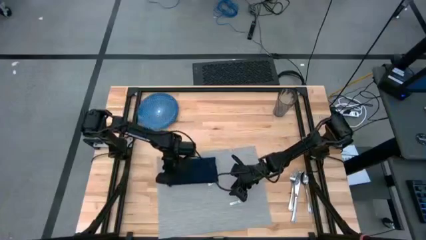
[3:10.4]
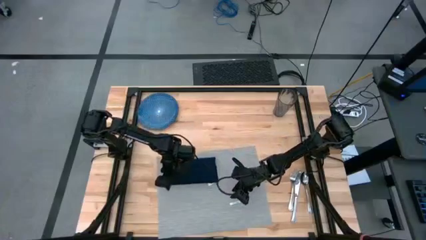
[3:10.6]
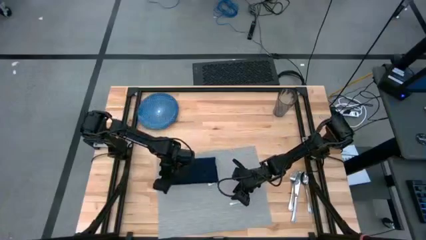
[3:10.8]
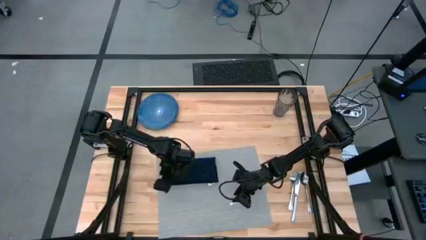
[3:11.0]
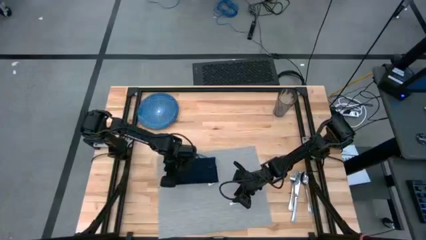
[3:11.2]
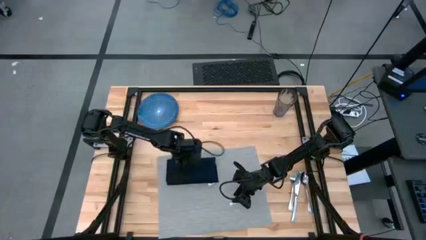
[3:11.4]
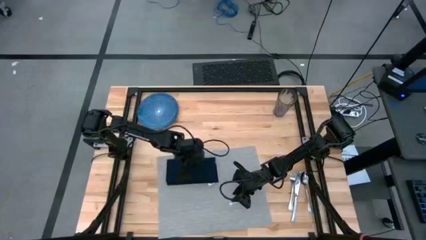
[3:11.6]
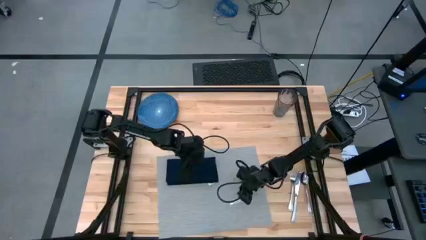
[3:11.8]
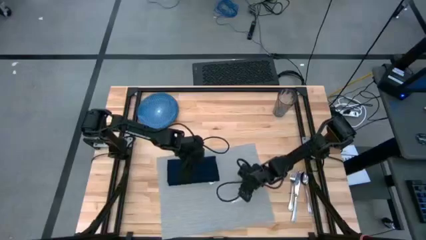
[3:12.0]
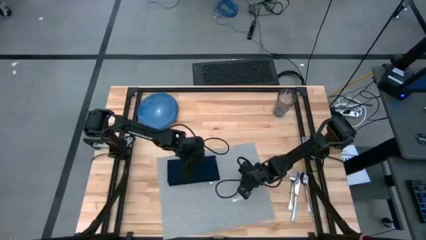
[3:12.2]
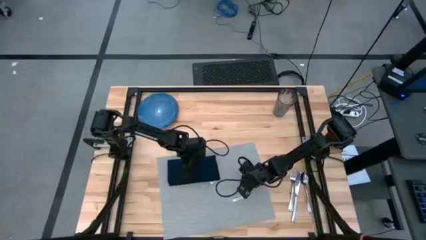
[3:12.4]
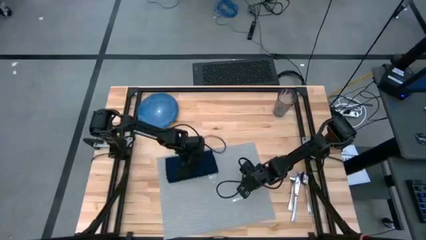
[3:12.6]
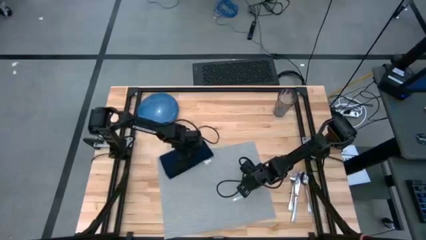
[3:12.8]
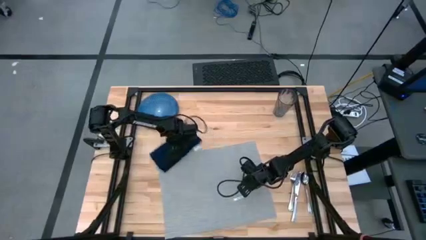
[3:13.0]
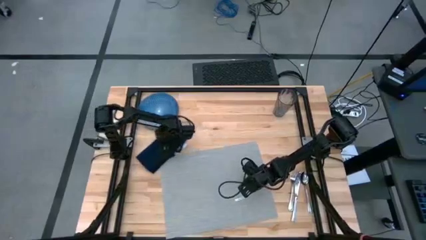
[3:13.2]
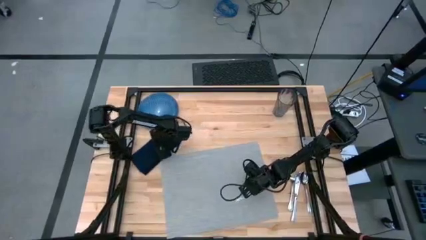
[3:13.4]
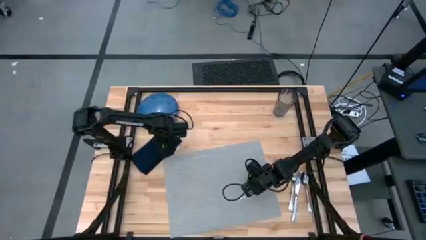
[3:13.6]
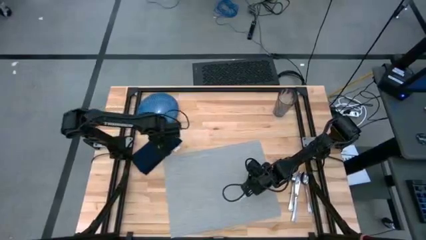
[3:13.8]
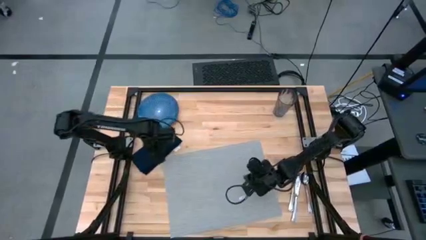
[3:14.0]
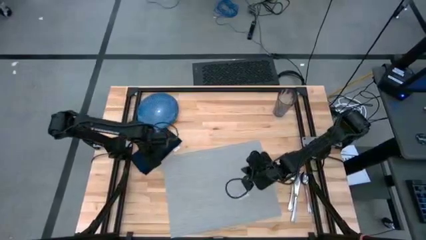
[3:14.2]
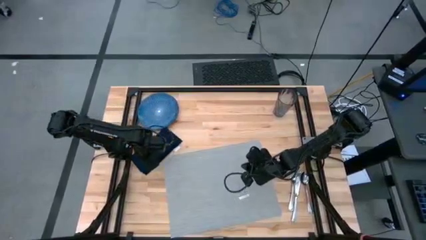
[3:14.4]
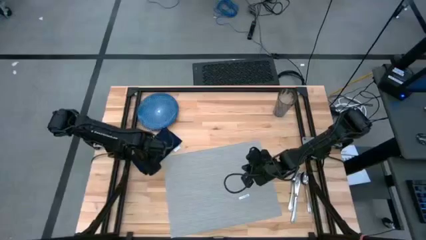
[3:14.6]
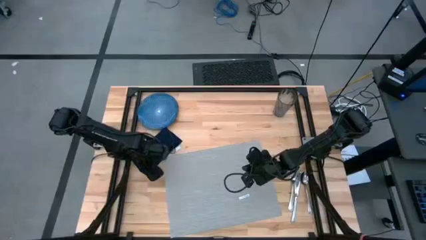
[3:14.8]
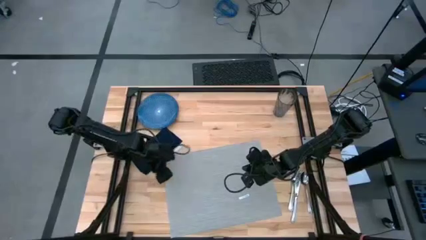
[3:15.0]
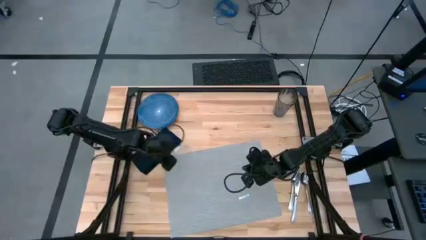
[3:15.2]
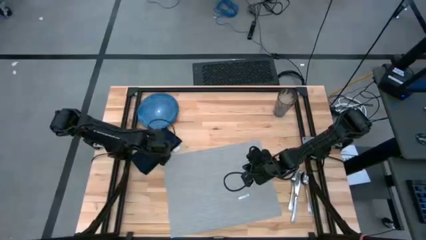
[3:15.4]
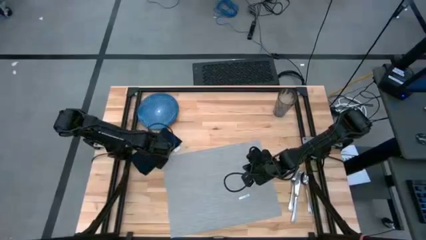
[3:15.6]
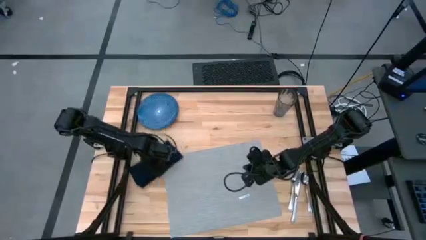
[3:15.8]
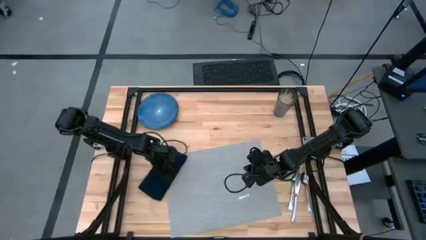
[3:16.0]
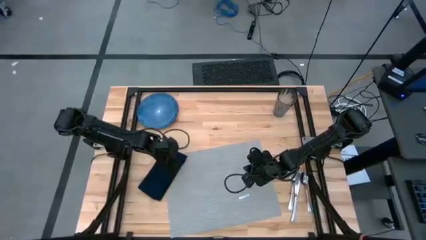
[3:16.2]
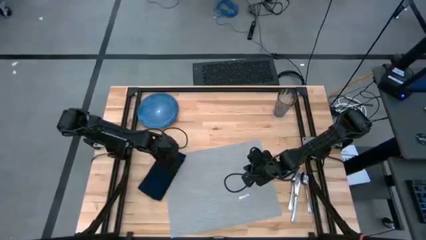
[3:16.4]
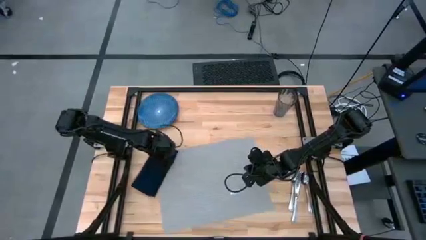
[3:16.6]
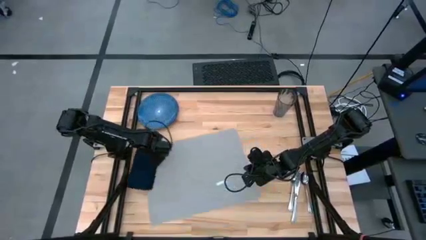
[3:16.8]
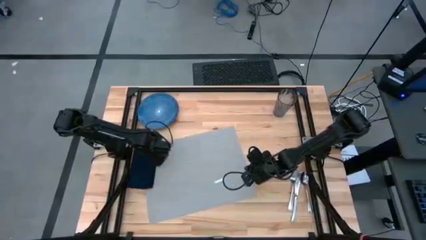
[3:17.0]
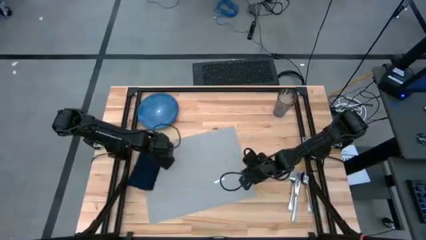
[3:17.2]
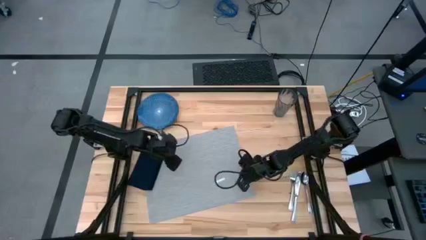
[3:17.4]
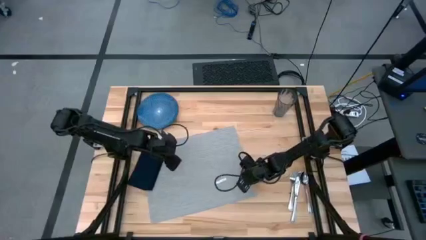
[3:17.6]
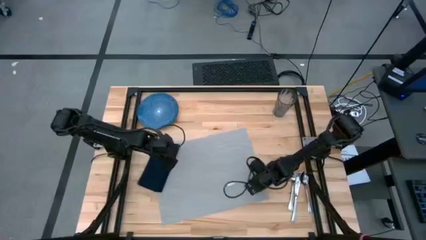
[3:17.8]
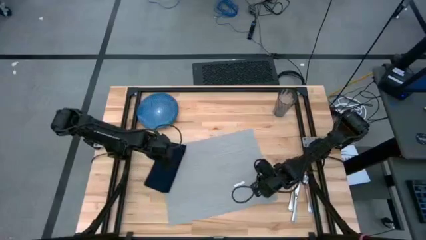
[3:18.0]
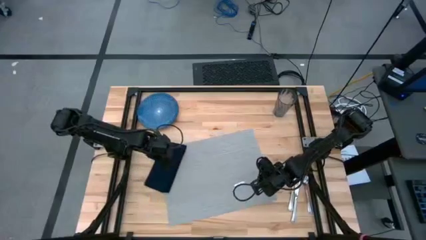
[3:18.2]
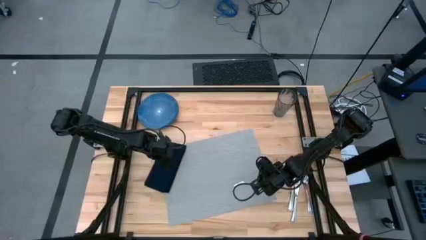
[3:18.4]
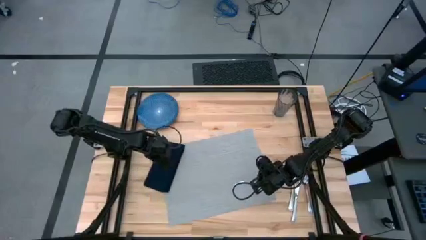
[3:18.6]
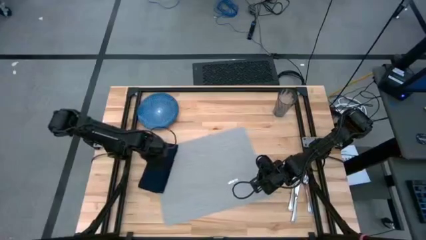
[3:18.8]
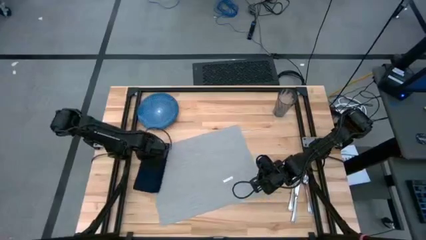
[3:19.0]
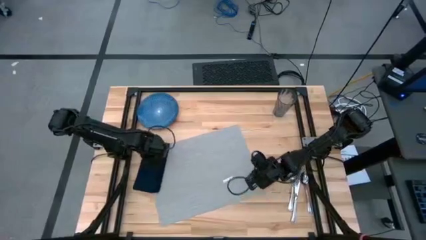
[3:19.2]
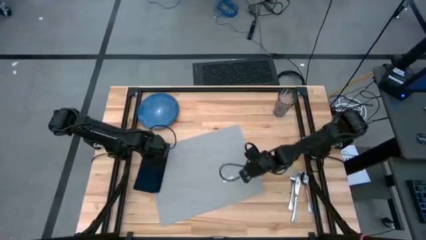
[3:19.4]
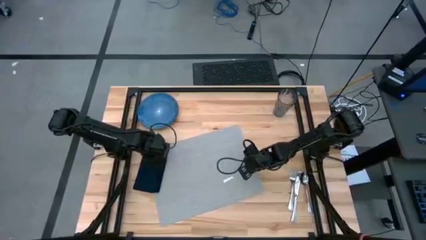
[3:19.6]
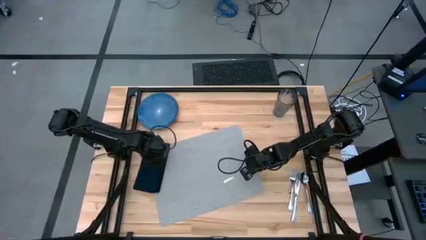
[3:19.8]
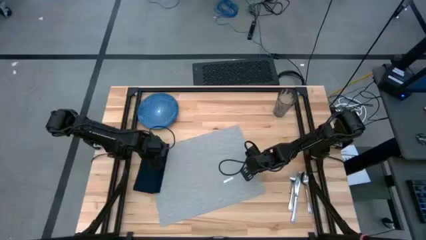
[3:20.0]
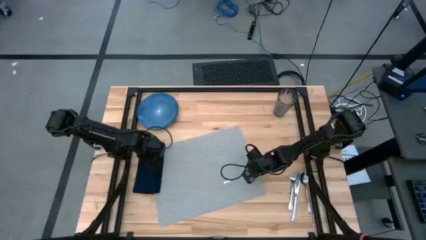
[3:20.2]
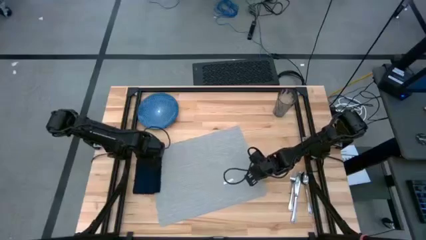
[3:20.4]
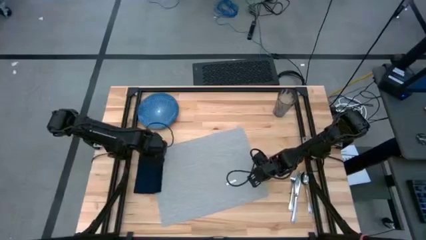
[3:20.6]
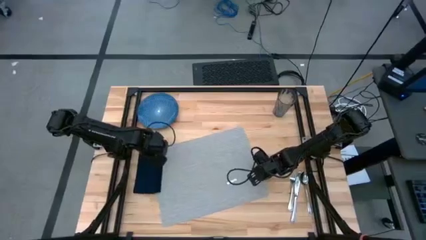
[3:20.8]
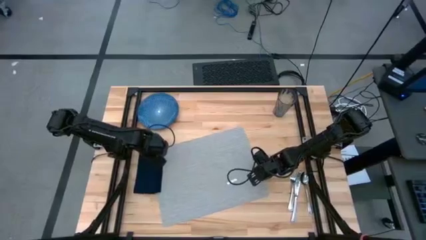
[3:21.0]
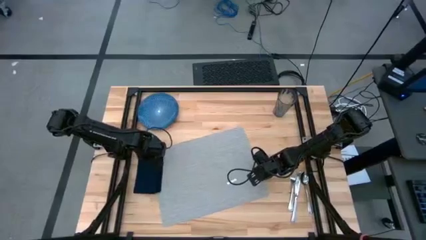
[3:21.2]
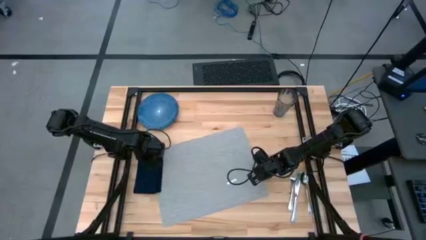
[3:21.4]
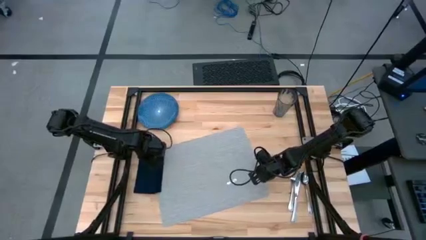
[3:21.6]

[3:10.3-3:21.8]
Task: Set table place
Move the dark blue napkin to the middle left of table

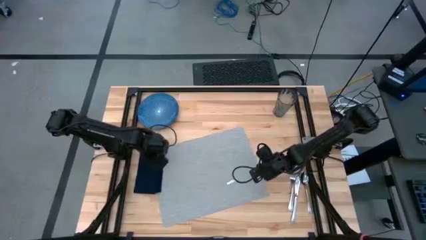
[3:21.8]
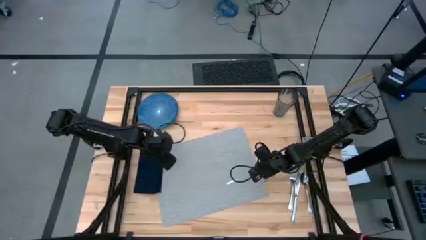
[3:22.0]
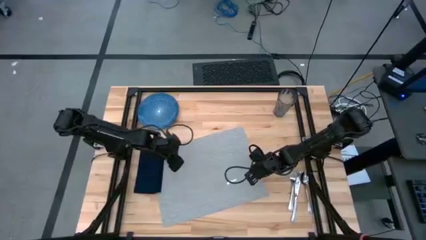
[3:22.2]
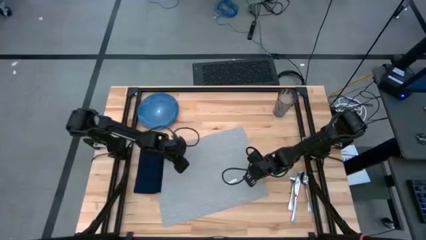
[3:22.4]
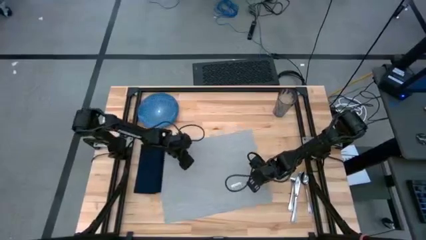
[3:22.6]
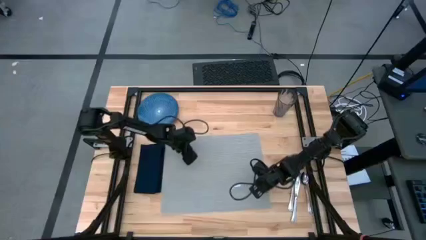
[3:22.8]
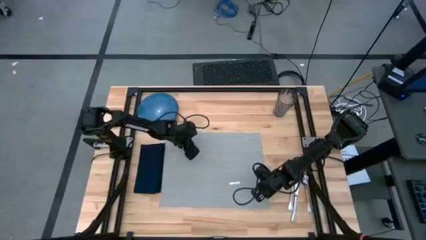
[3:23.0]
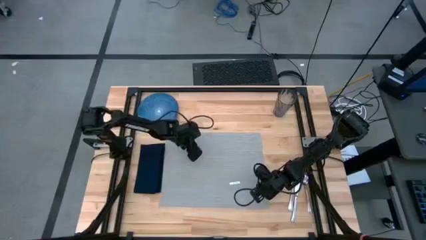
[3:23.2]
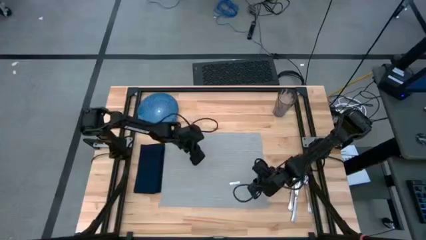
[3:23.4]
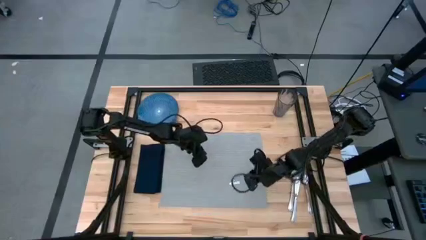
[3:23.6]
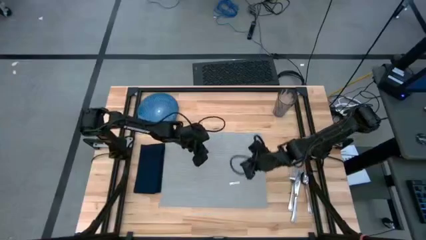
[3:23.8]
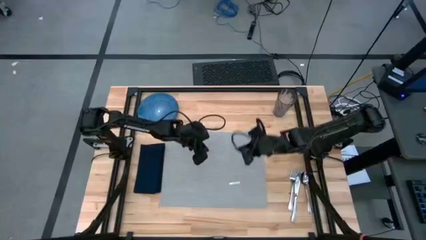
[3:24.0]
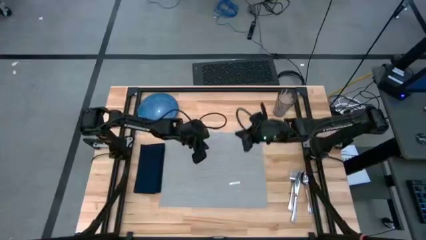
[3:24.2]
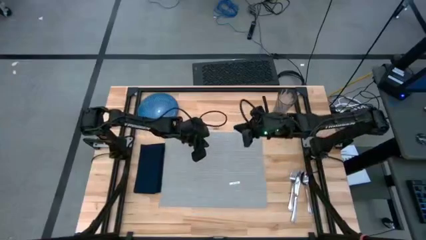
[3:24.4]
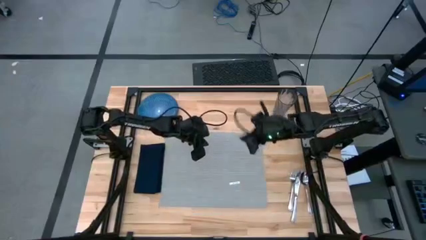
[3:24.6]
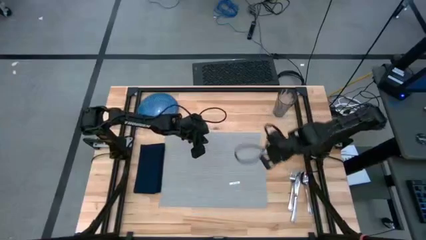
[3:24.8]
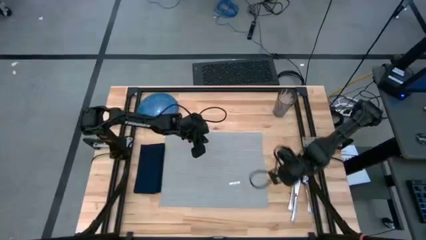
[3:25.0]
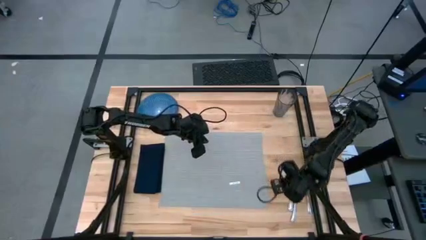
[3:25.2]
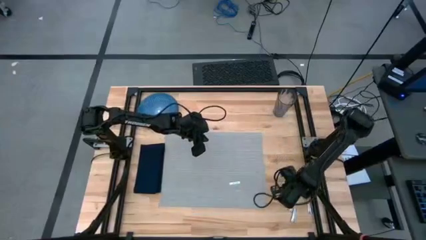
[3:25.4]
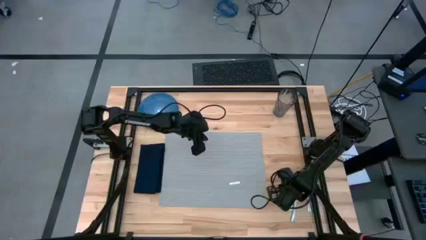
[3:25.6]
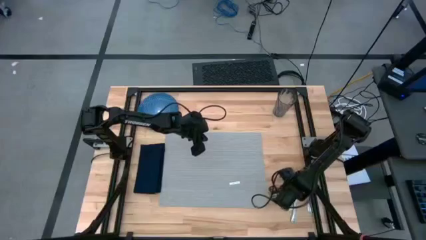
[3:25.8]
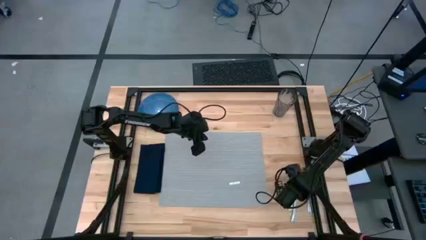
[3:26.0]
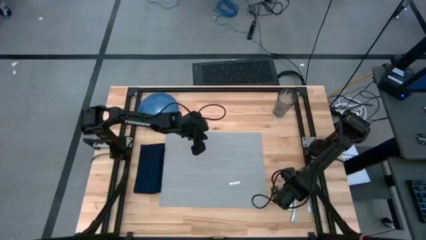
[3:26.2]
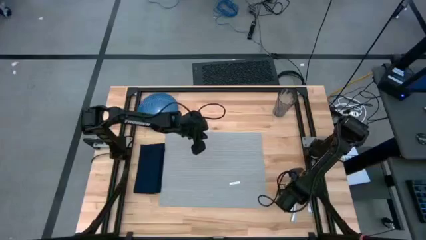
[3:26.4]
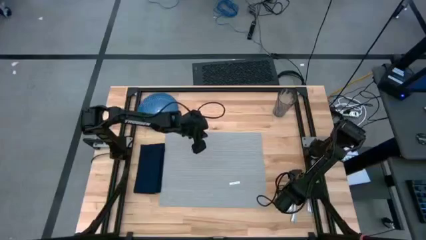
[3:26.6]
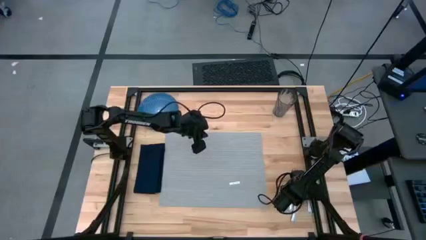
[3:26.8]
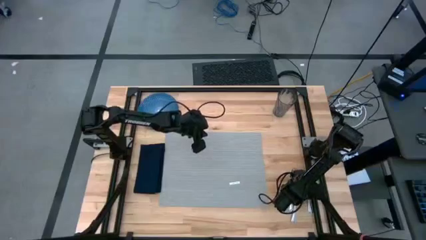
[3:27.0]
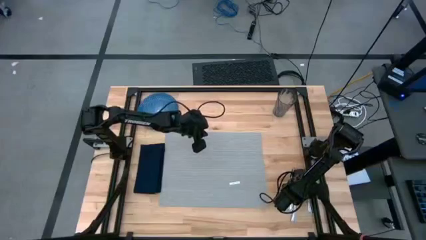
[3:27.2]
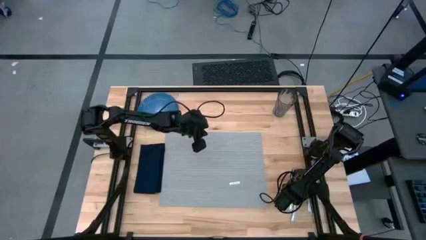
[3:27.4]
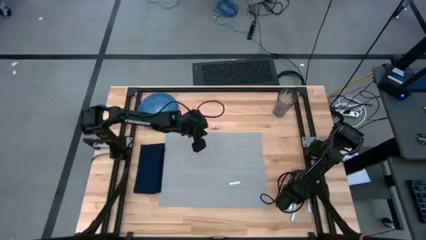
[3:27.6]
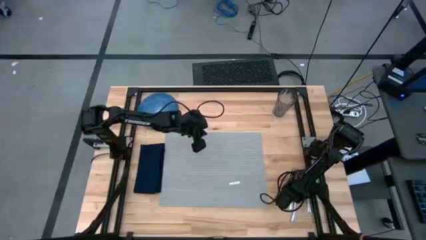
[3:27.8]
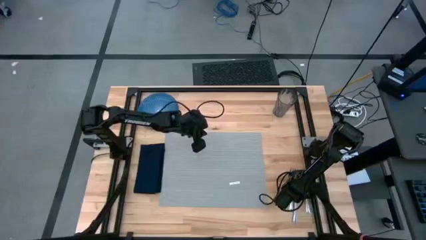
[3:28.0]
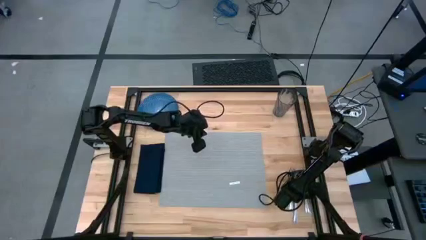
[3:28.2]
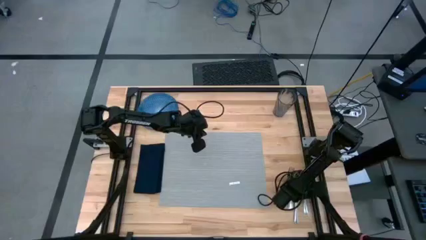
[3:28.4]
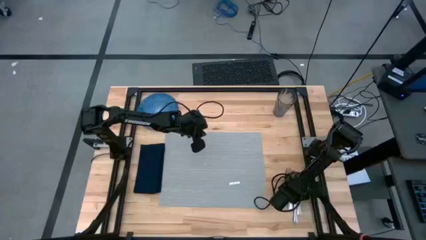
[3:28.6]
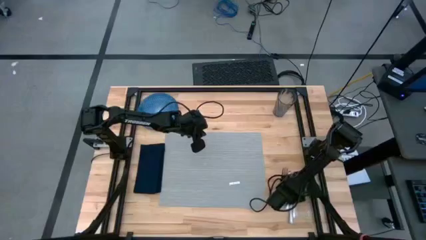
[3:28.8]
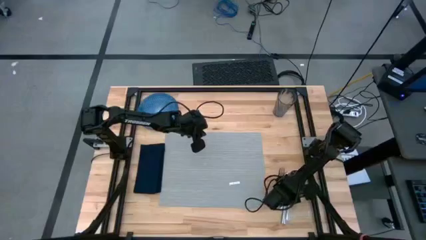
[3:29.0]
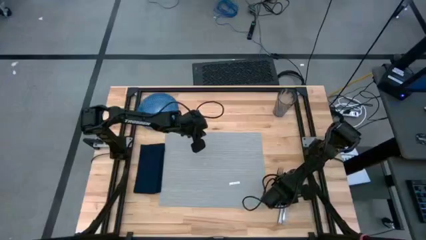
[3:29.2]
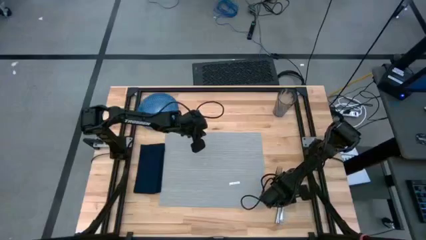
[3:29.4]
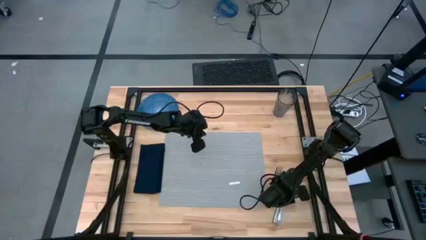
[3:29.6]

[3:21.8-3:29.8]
Adjust the silver spoon
